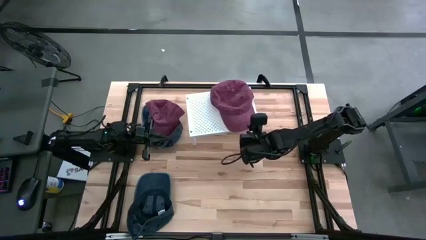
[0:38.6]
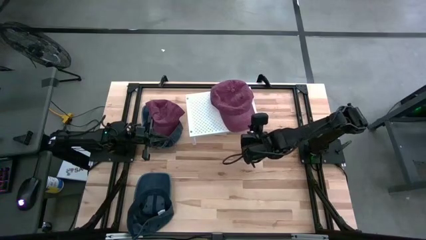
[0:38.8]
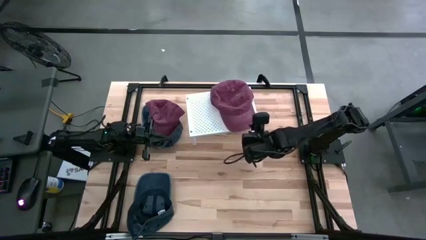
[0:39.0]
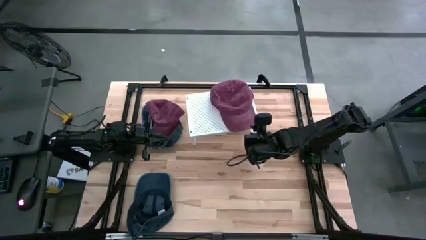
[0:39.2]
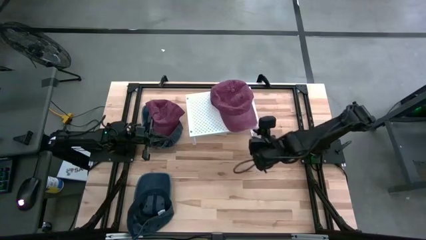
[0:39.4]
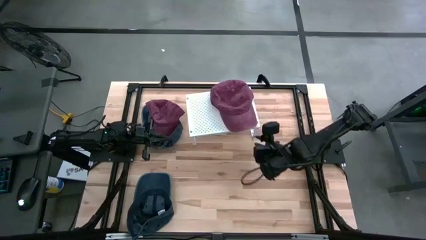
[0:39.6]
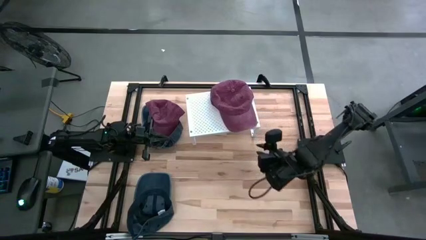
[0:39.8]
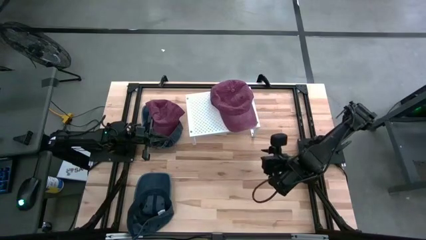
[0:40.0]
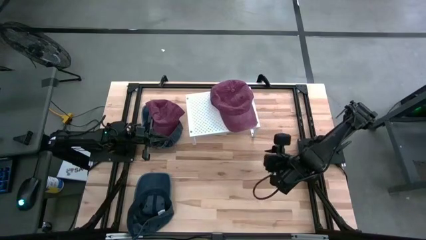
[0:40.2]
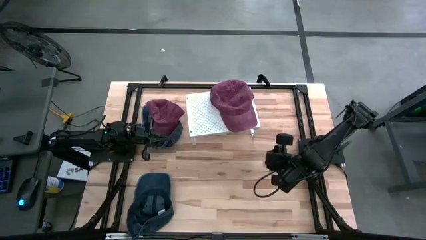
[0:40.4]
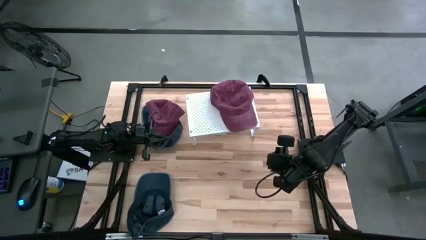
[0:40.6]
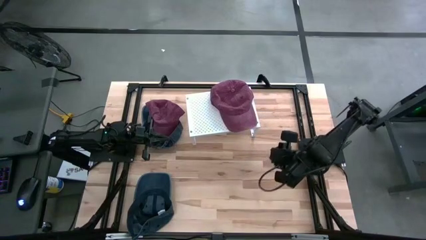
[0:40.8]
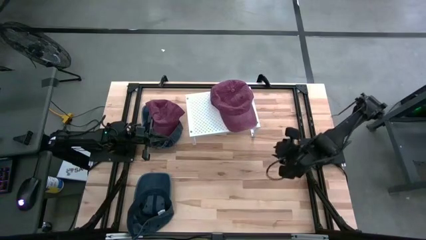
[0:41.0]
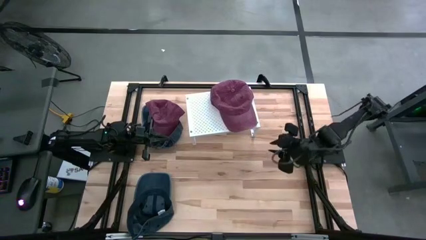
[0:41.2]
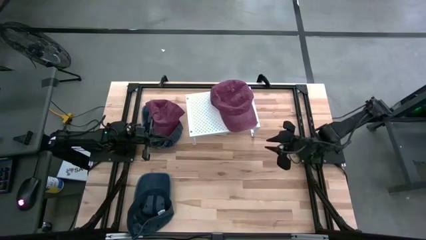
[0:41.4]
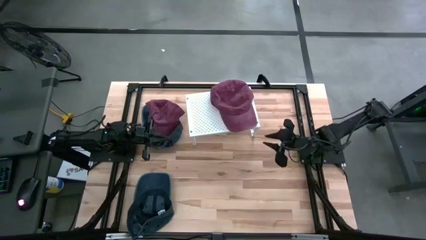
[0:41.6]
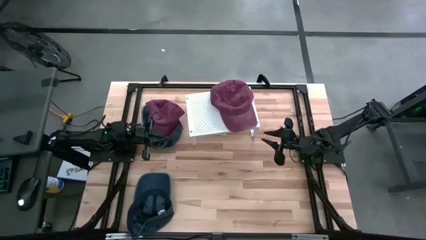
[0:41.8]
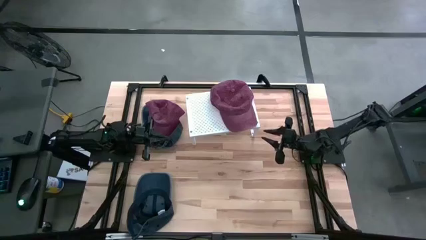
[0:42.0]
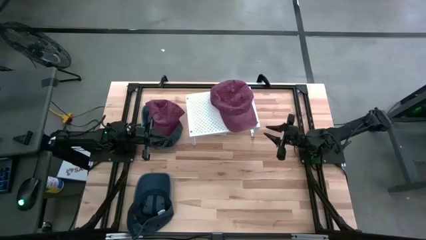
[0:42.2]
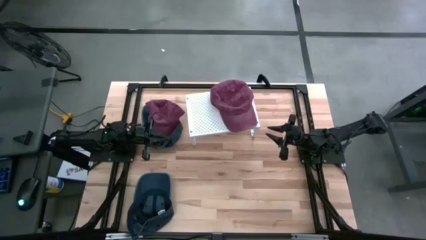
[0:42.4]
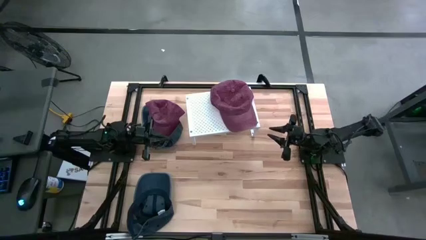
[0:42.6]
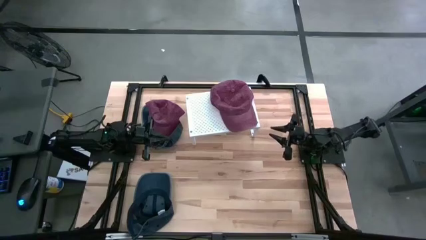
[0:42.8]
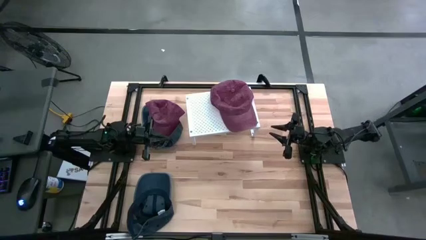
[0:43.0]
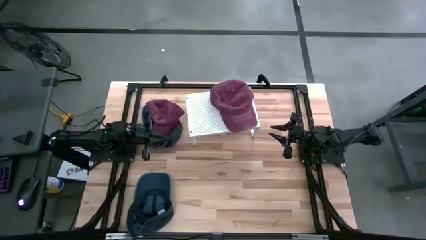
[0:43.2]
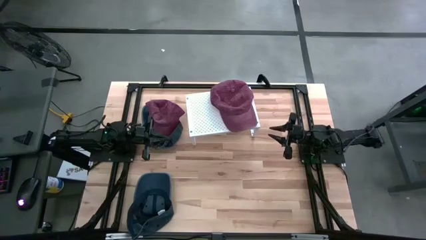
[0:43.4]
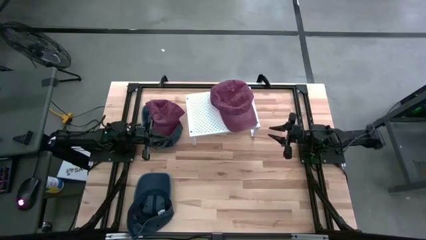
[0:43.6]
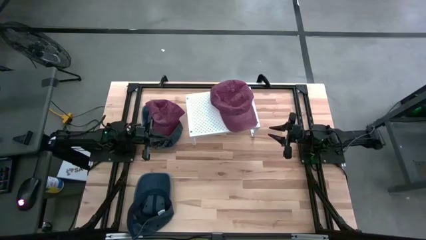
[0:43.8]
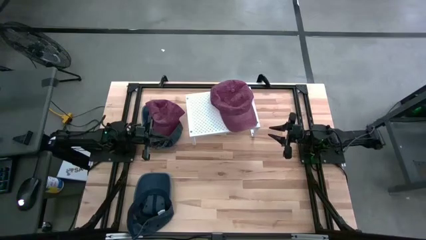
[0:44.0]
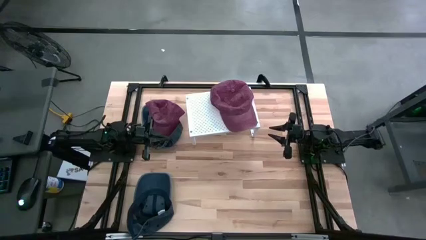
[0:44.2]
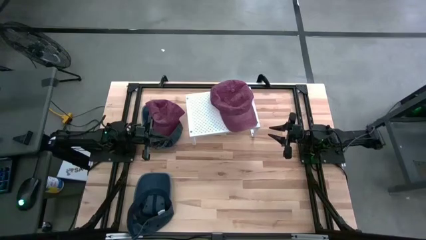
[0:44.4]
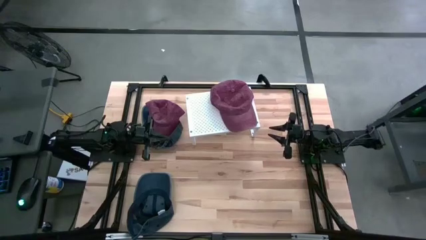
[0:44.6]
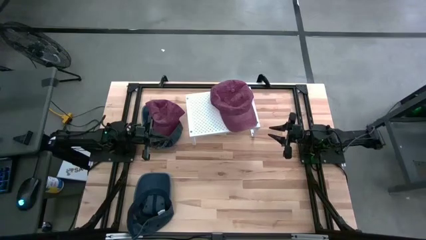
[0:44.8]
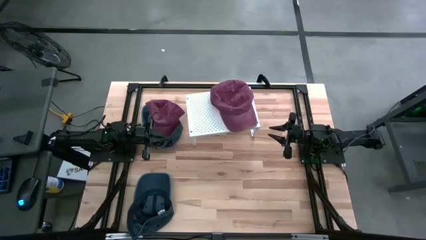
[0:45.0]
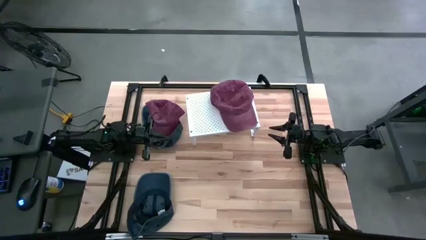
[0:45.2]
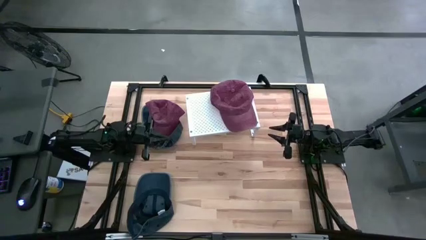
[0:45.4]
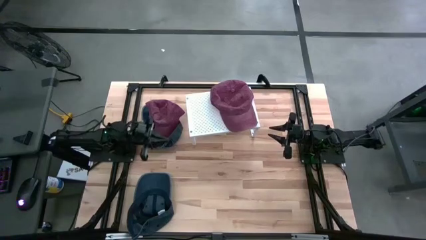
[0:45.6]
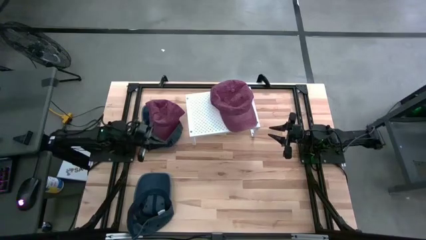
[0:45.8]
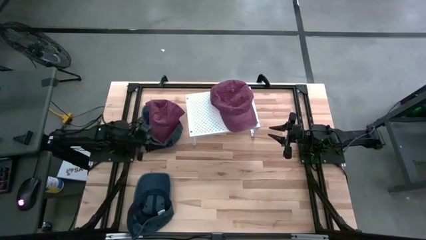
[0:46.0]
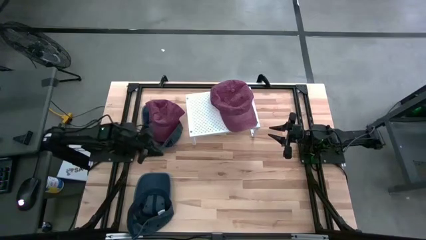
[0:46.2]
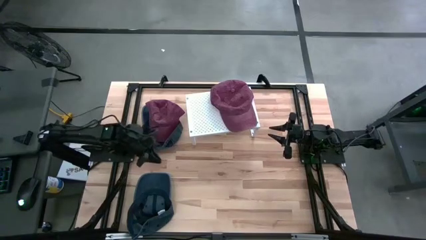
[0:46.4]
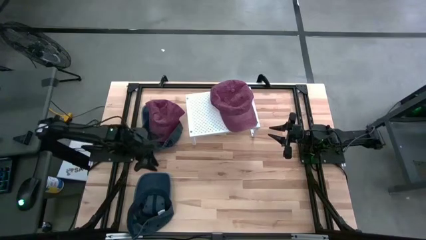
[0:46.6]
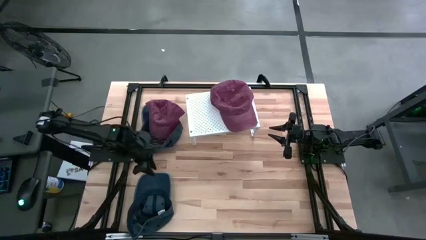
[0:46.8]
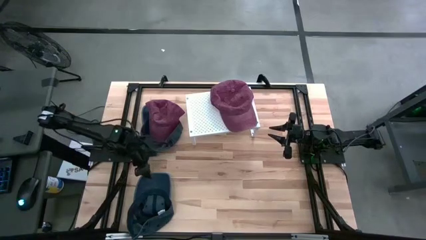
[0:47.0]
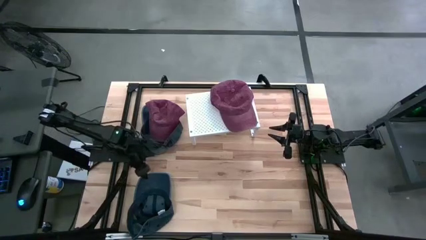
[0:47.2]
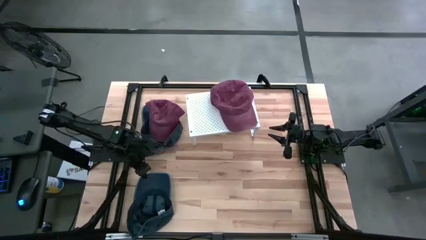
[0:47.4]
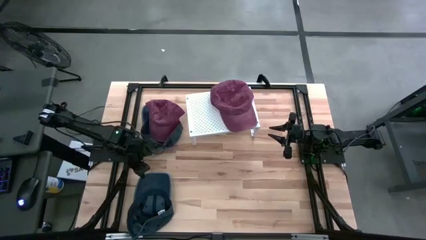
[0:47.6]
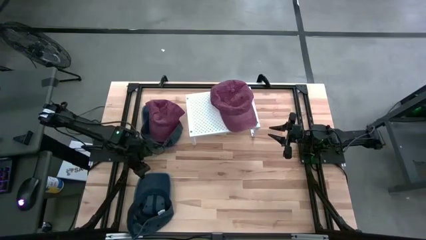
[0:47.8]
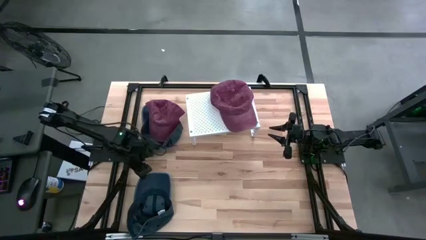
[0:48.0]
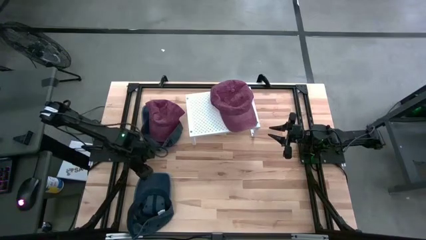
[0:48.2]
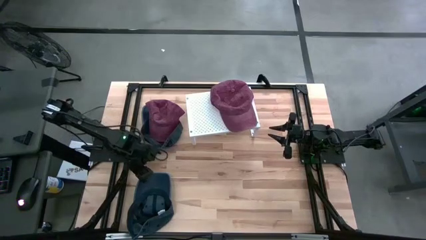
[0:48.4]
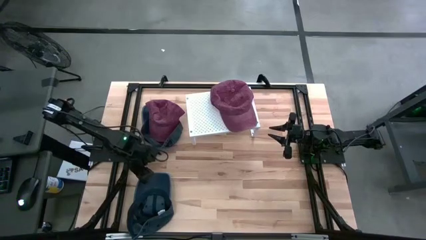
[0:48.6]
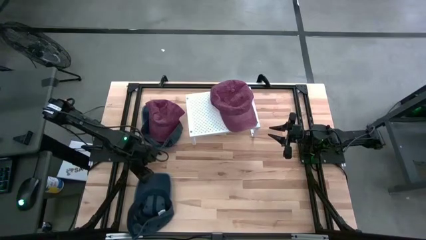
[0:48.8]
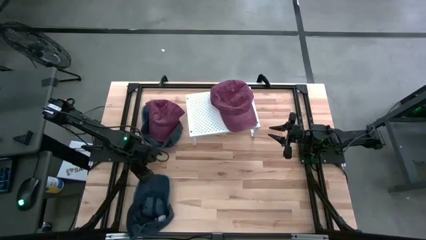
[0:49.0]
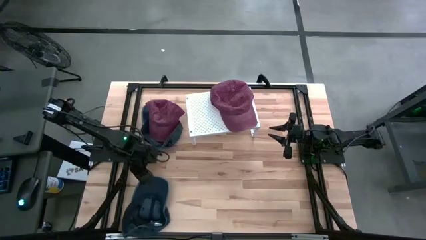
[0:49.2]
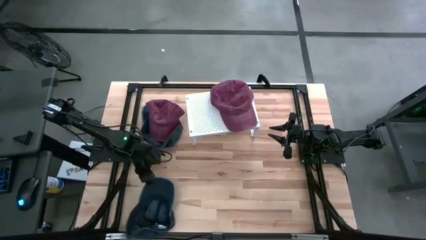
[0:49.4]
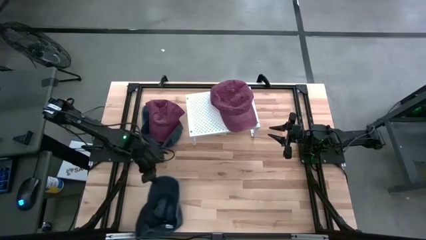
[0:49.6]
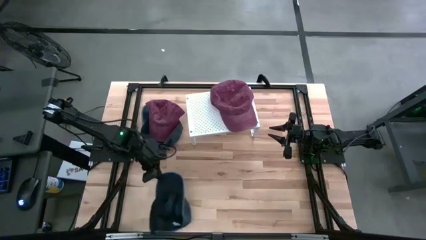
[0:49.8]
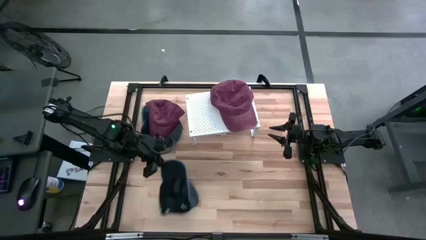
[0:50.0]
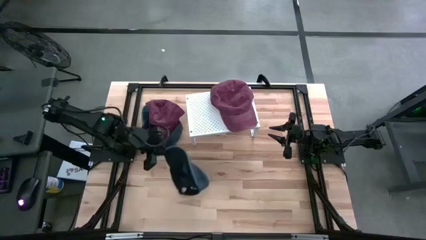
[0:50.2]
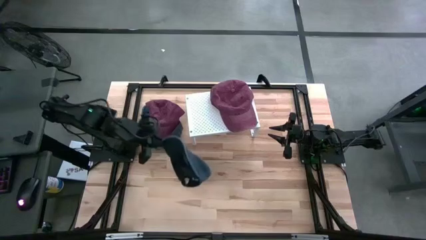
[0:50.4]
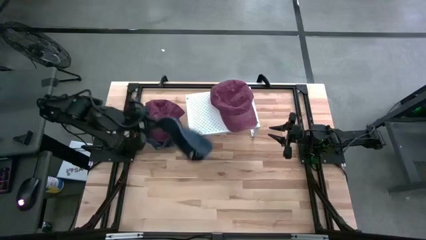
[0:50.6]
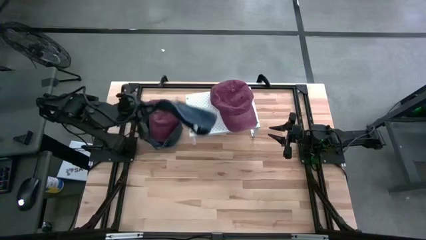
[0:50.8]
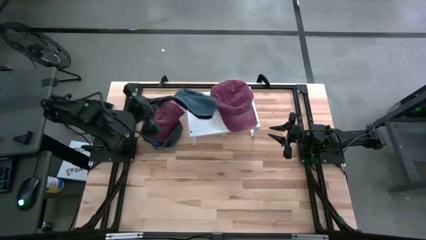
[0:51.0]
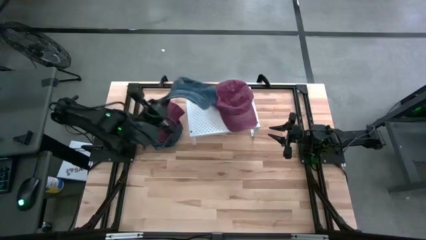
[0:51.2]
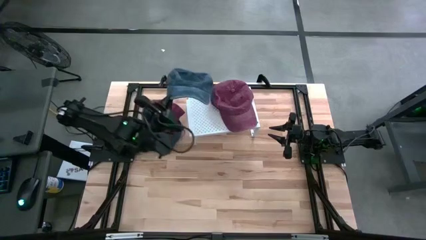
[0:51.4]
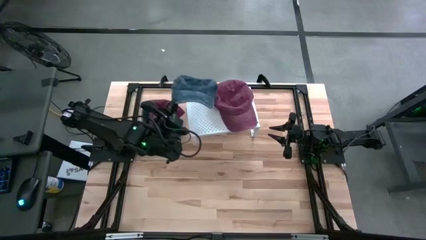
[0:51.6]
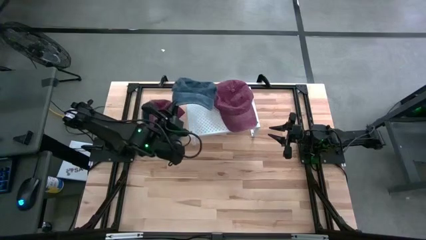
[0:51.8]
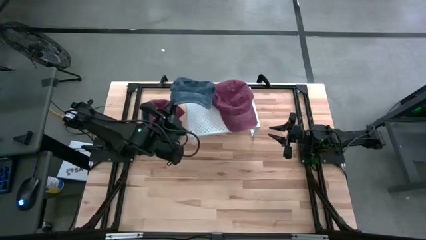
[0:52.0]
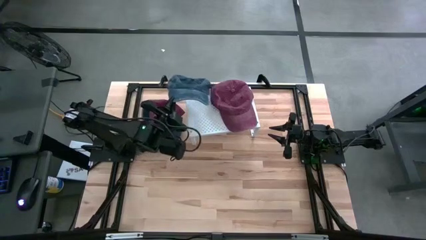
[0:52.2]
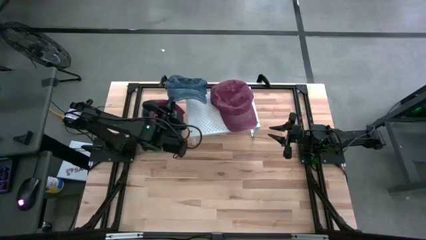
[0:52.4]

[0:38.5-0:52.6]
Task: Pick & Place hat
Put the bottom blue cap on the shelf
